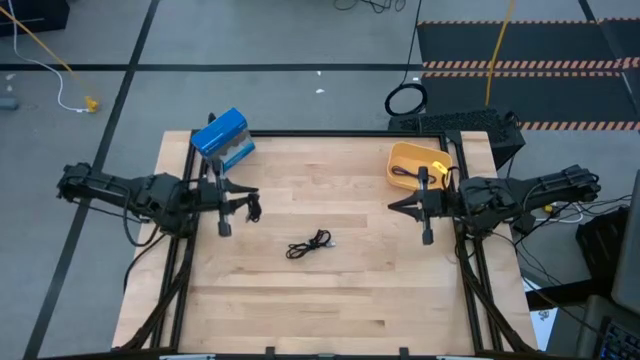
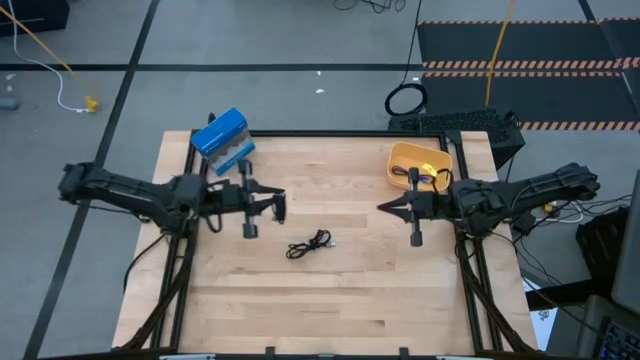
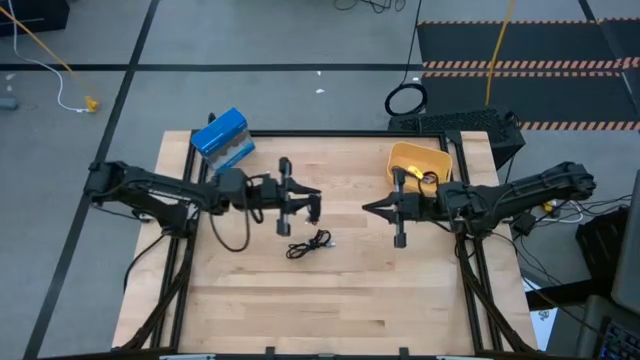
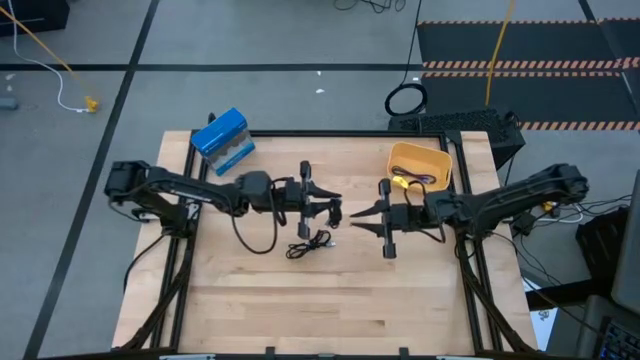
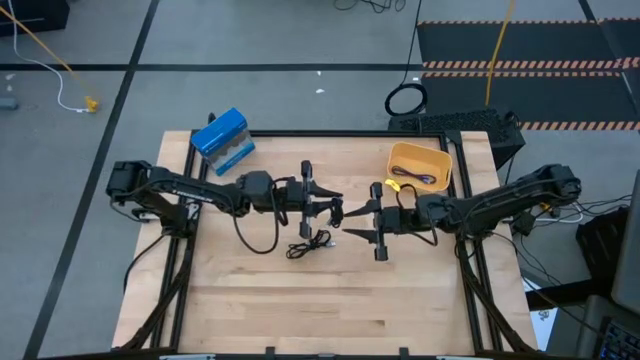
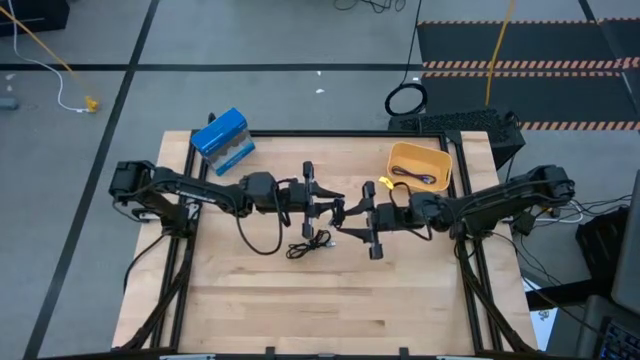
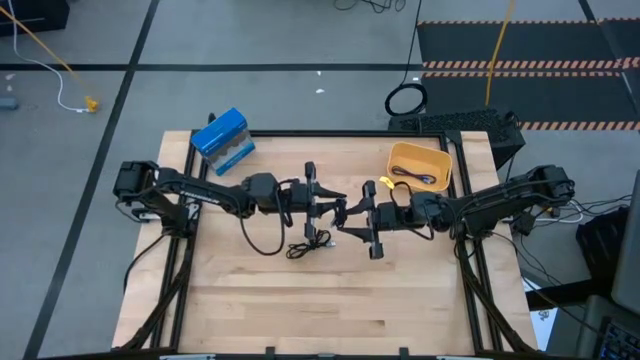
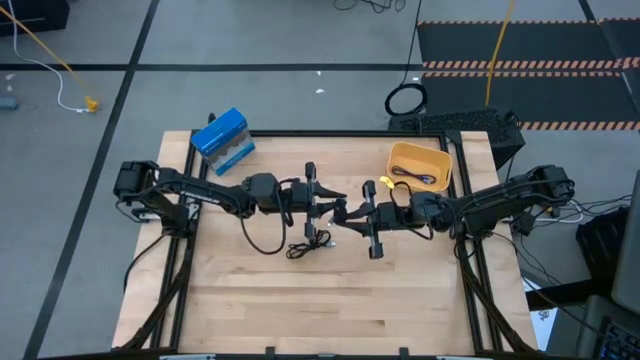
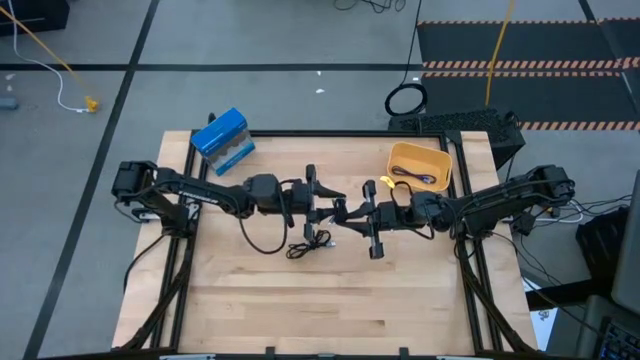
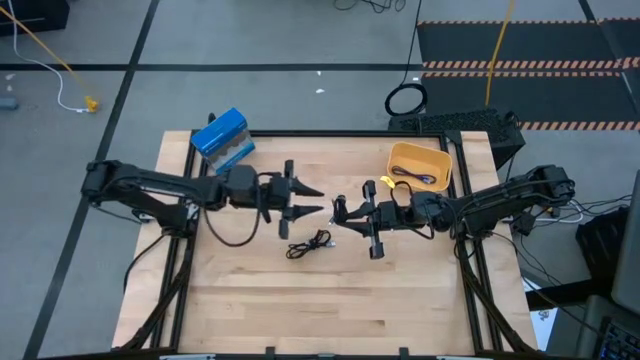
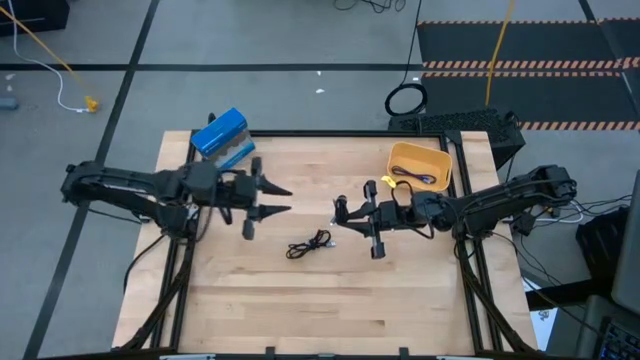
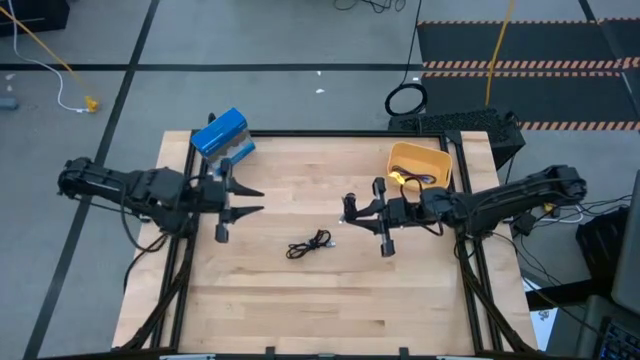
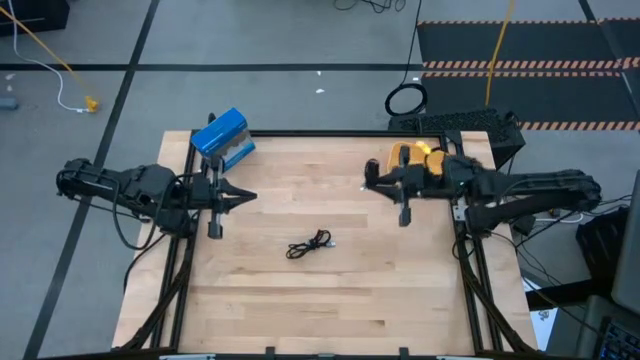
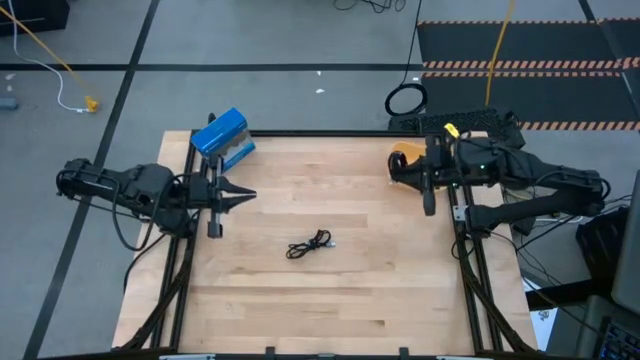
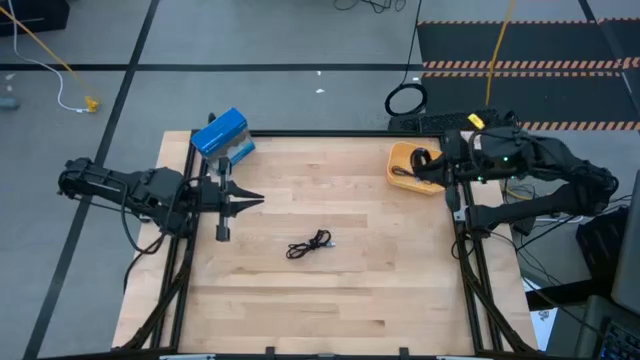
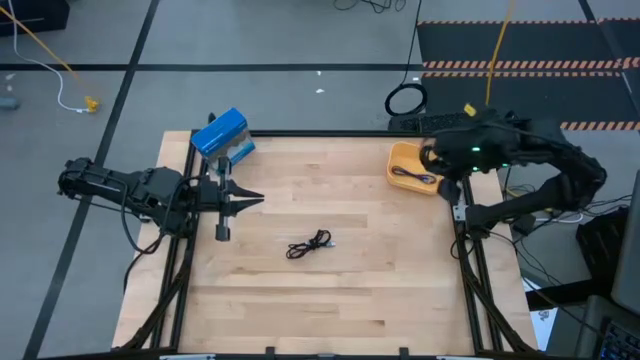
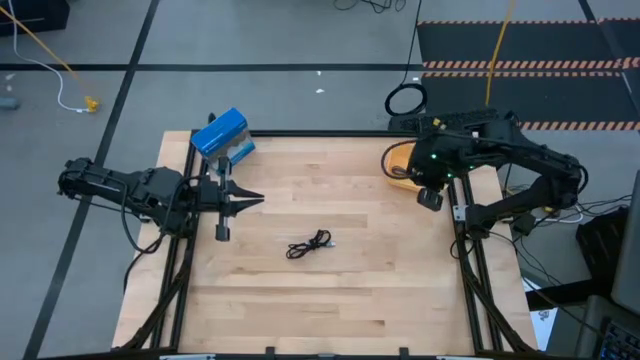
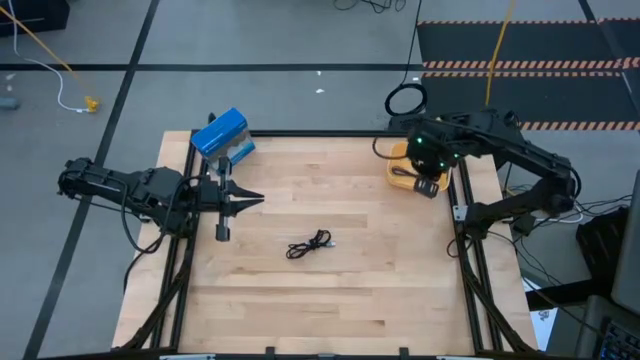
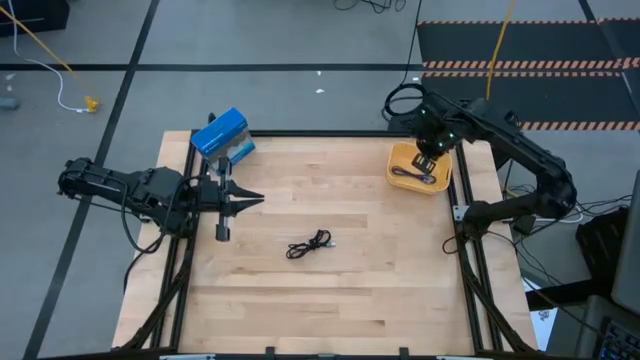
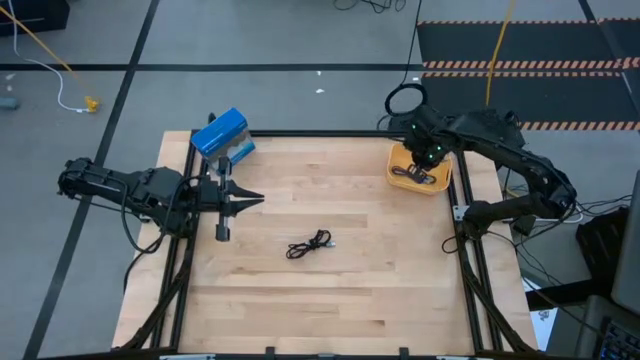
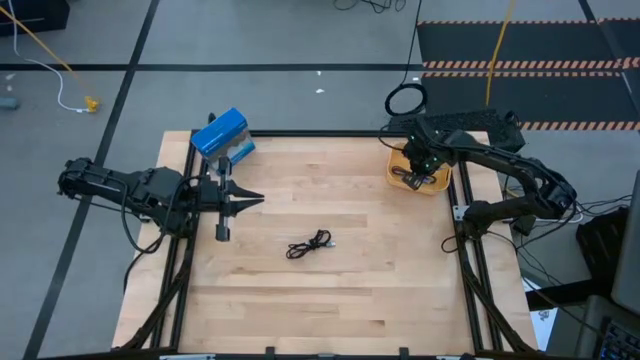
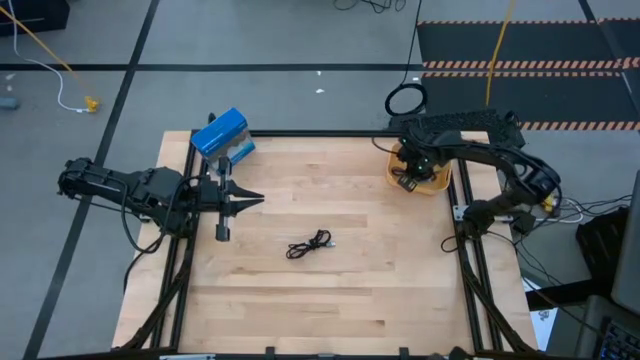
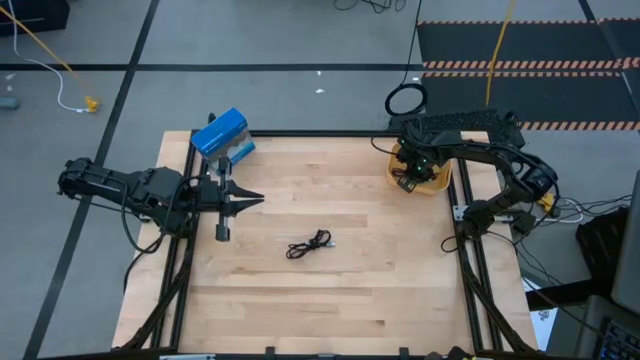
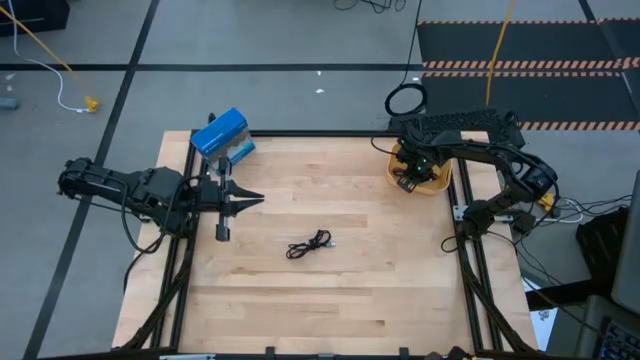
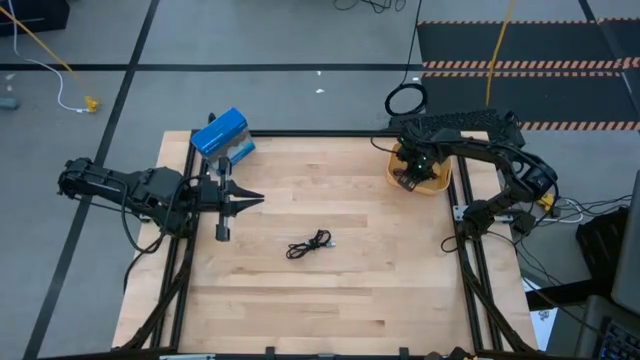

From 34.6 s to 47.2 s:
Task: Pick and place USB-C Cables
Put the bottom charger cable into the yellow bin

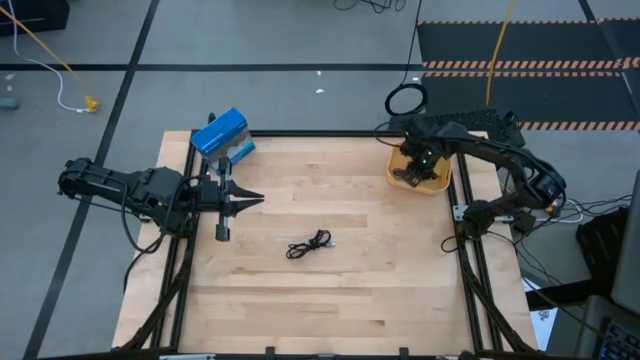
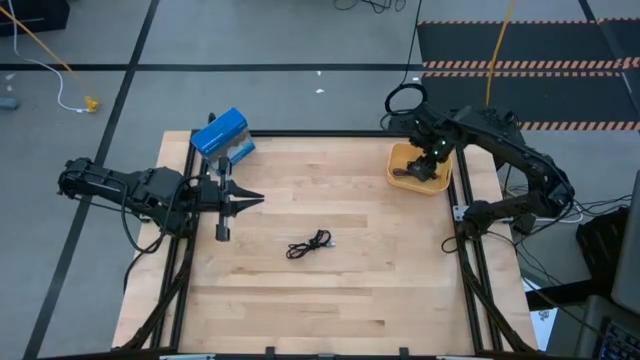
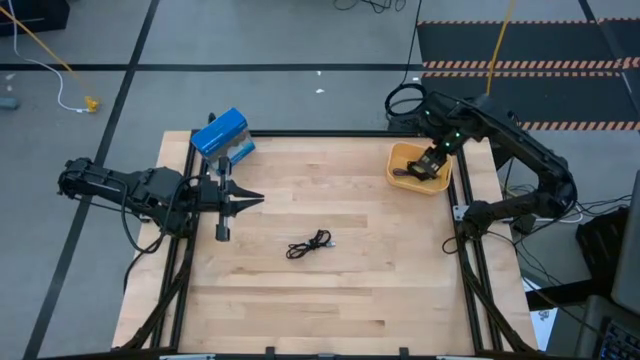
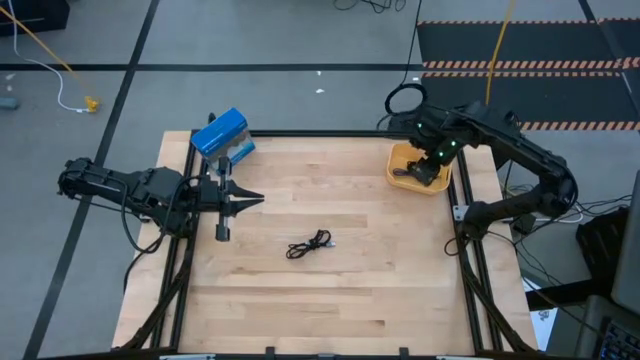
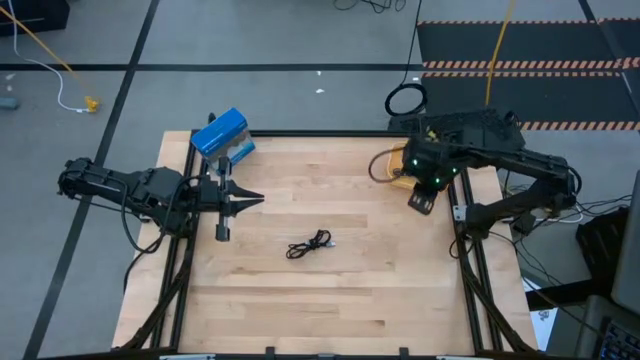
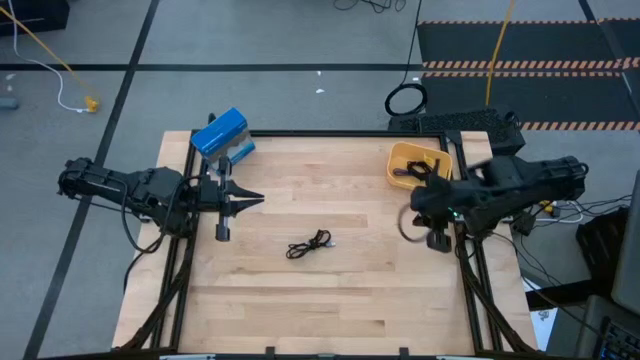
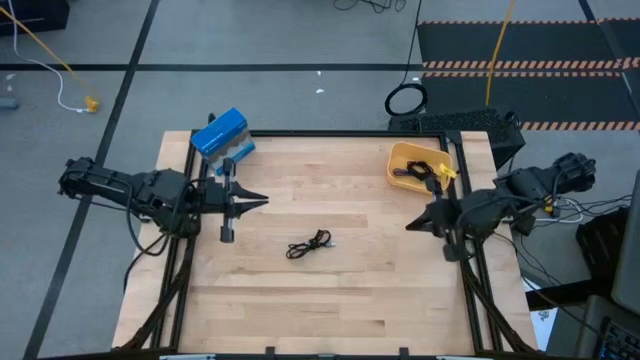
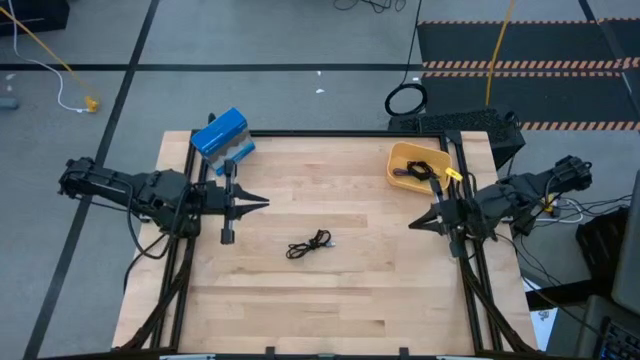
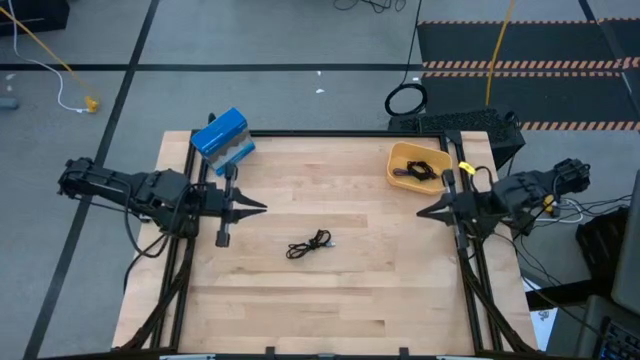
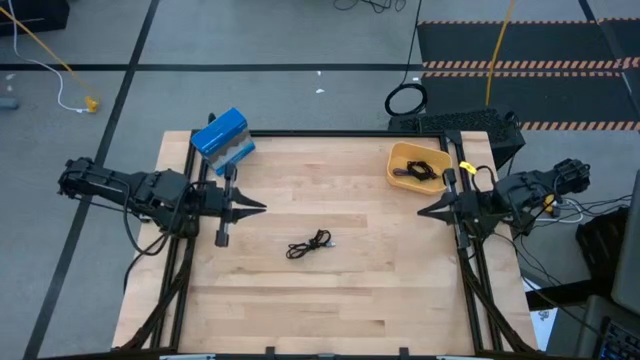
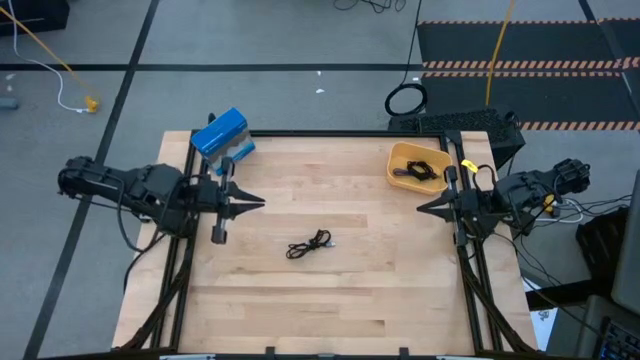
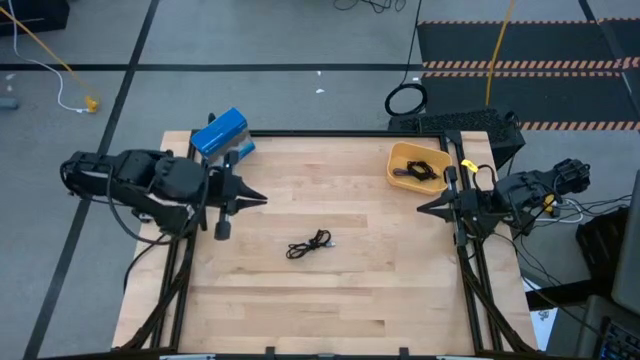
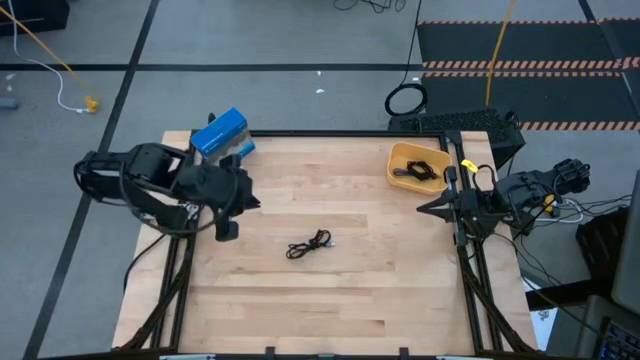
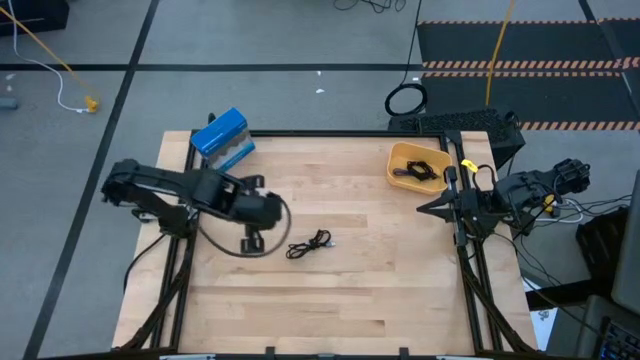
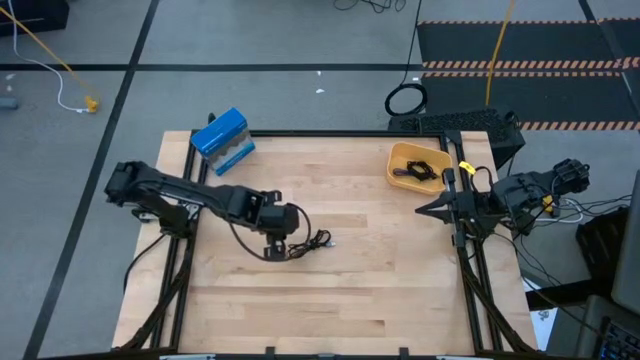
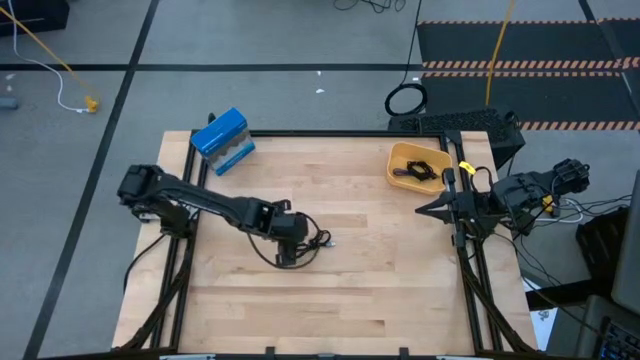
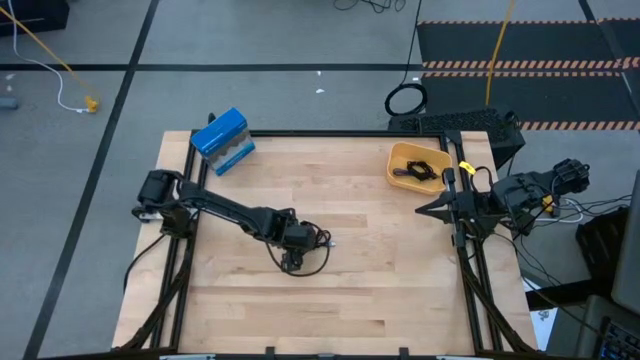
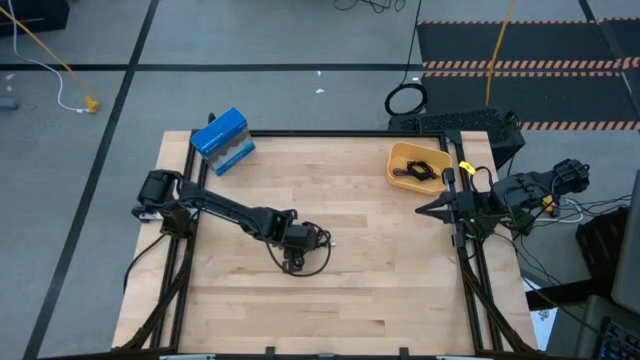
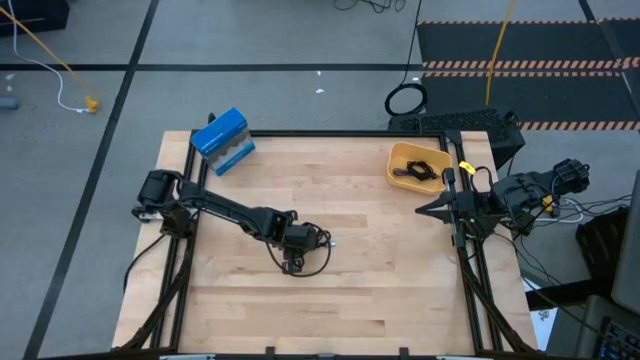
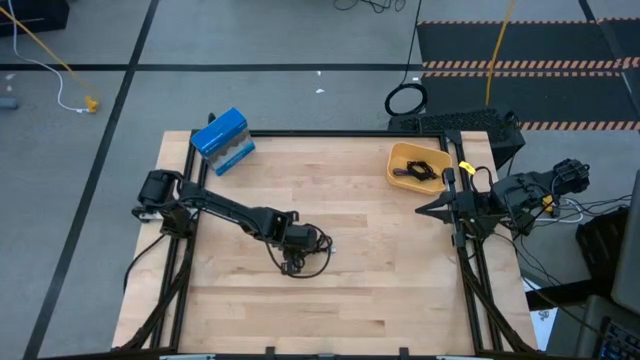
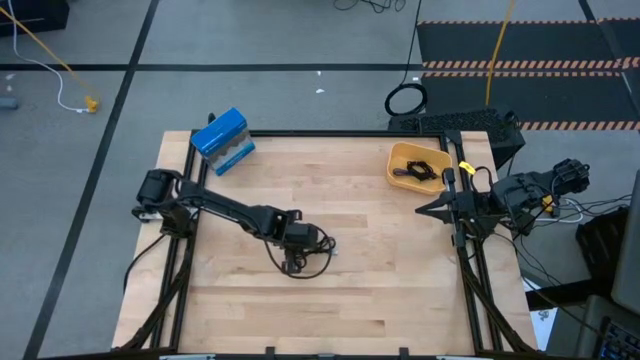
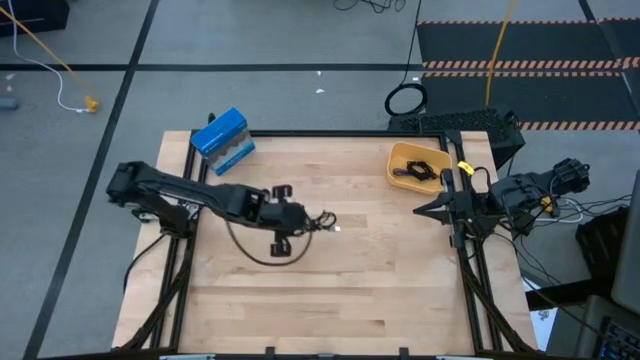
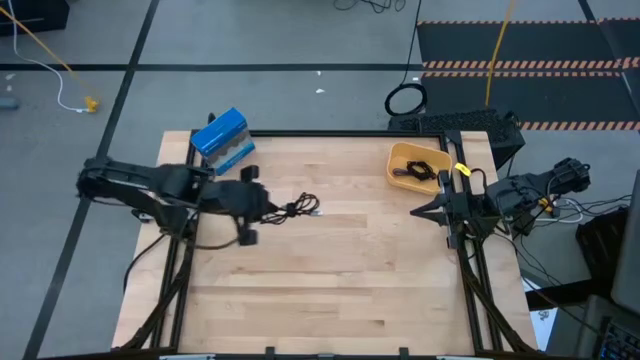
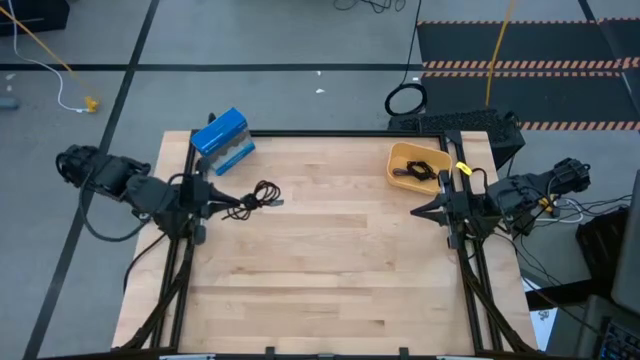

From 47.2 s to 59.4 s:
Put the charger cable into the yellow bin
